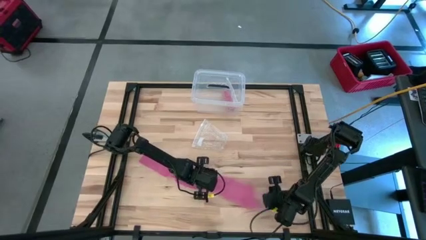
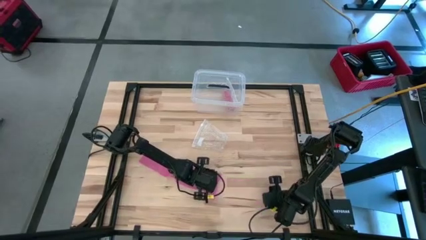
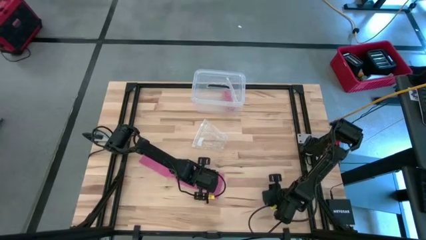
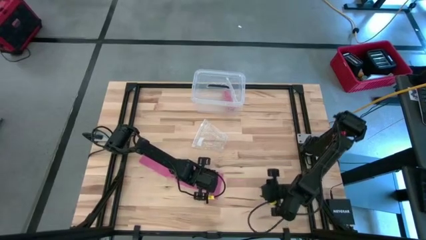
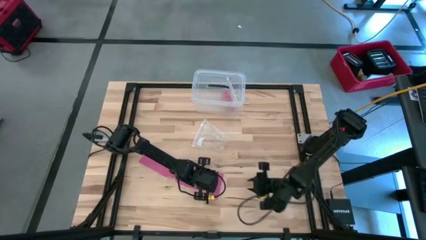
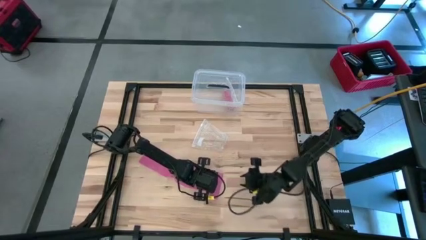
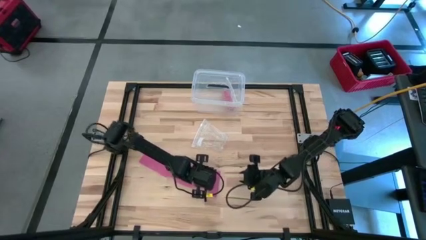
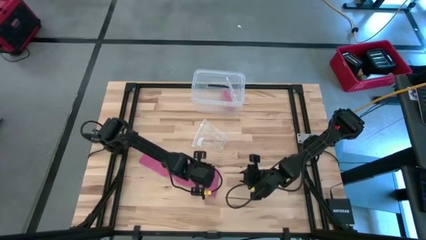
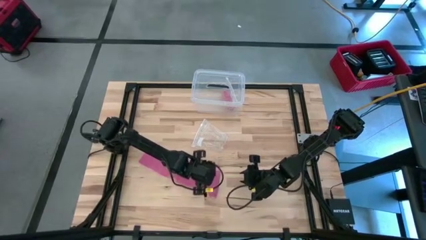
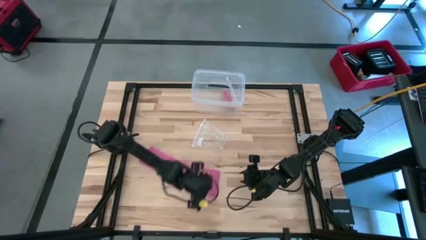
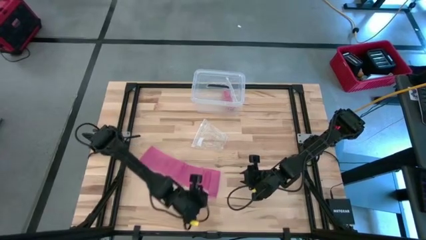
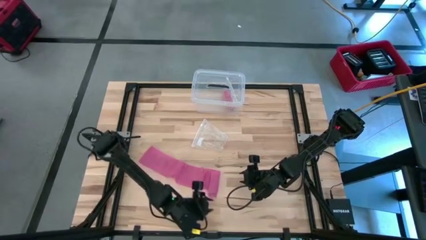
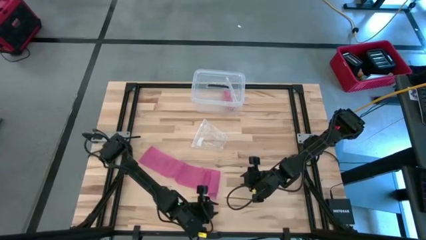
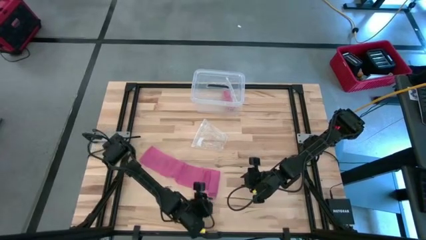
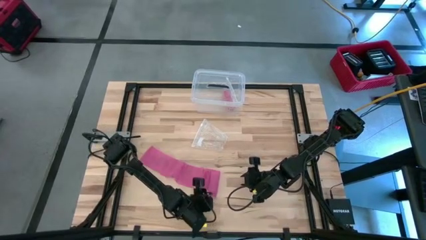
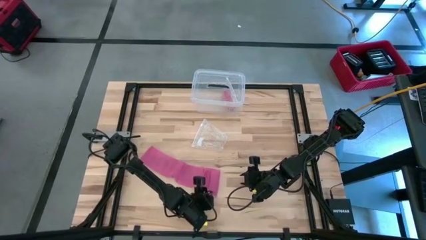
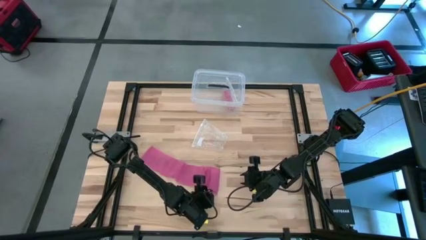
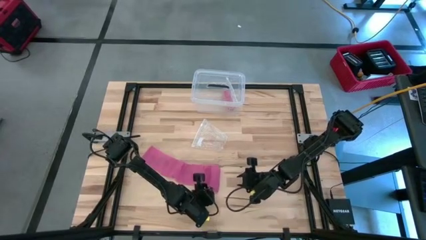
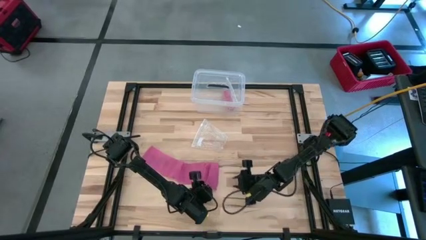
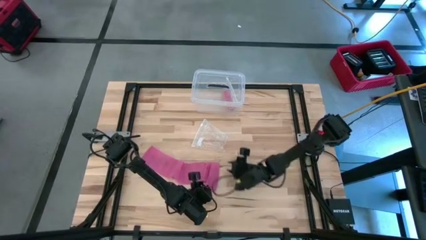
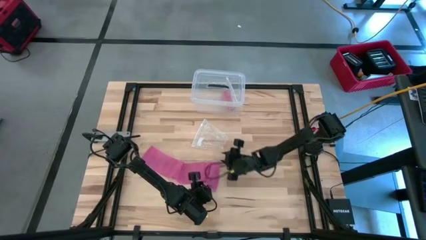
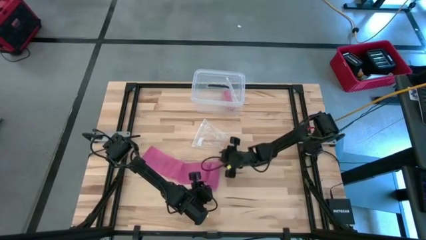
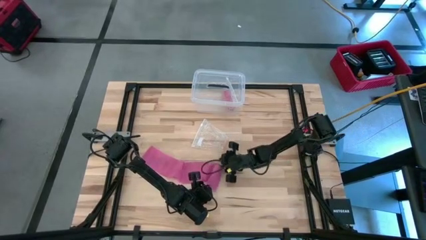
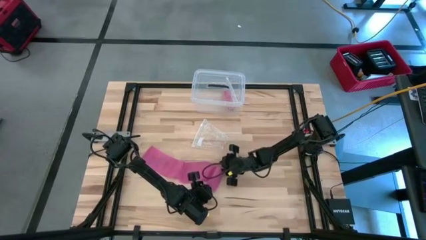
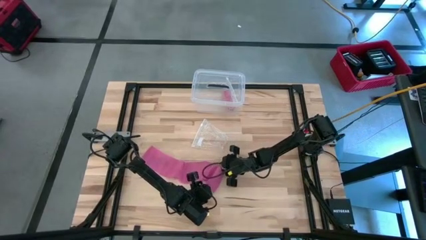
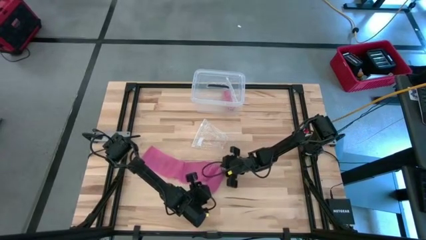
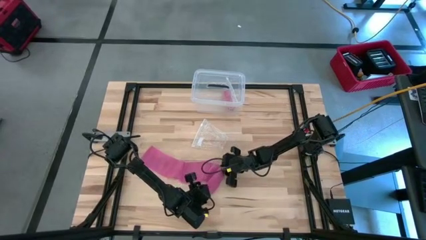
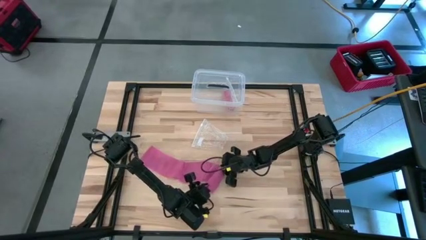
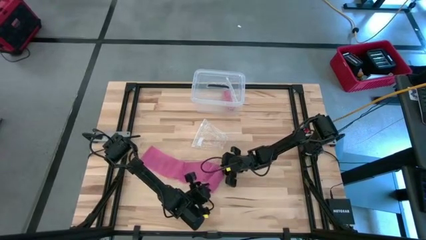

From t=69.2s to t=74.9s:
Task: Roll bandage
Roll the pink bandage

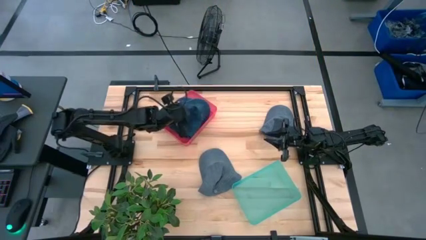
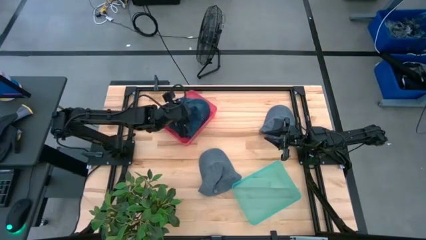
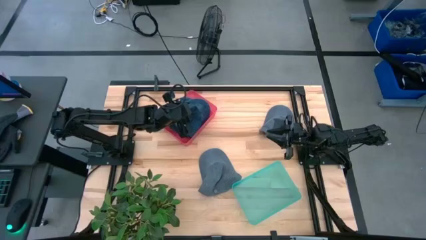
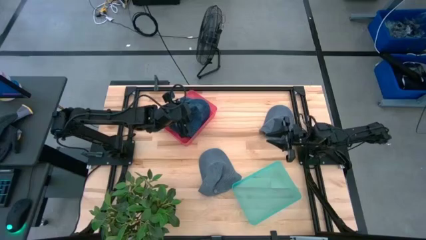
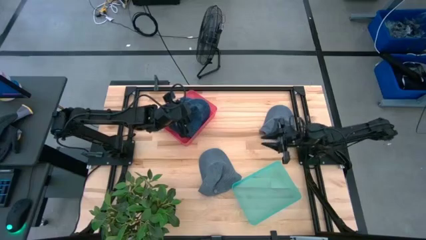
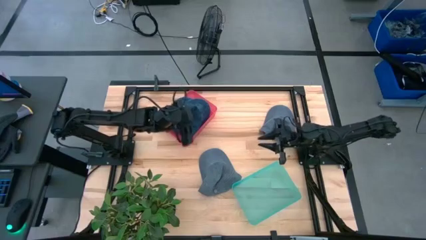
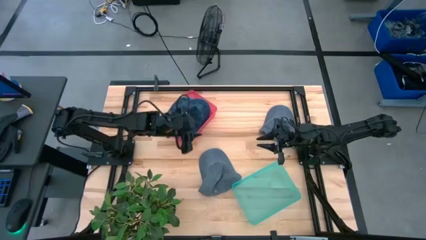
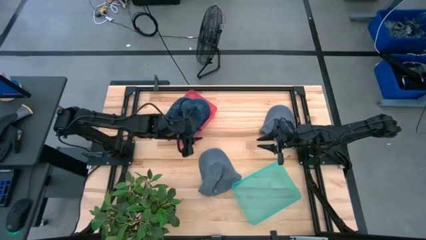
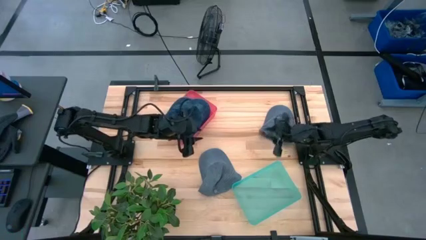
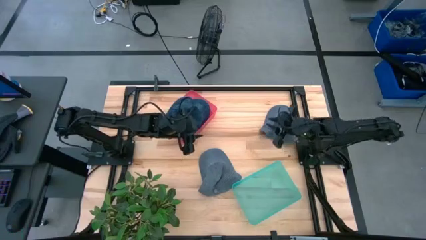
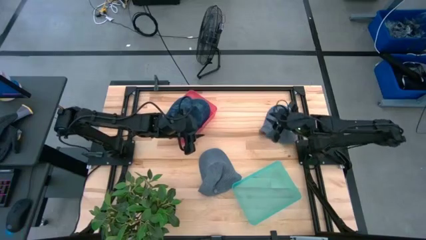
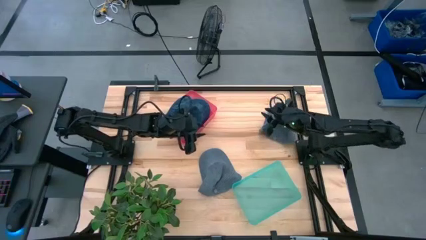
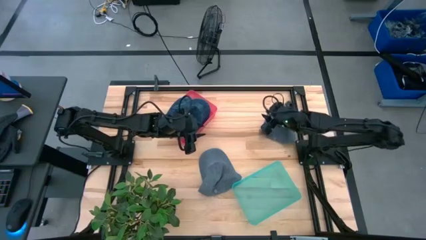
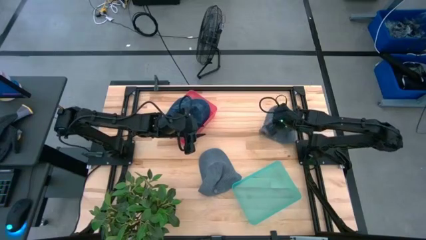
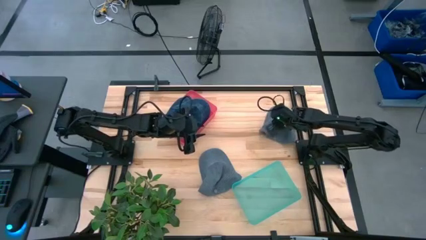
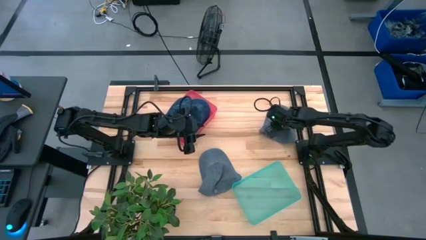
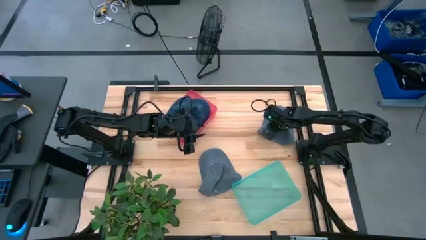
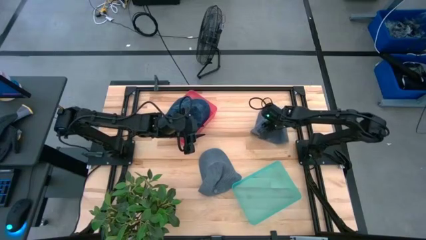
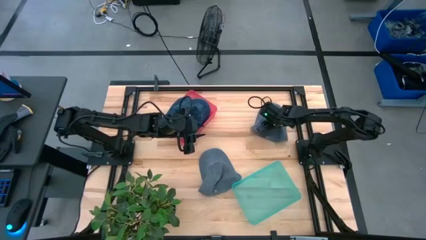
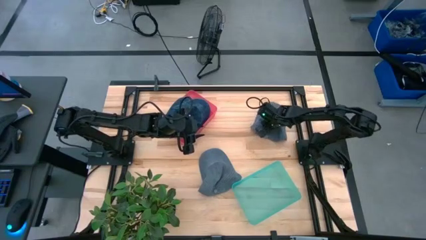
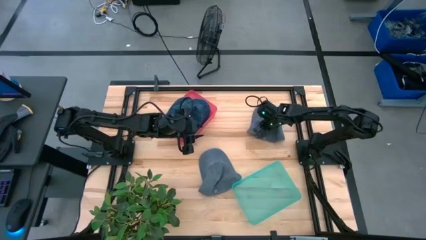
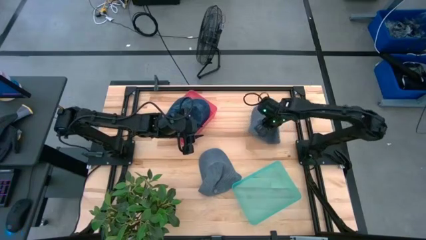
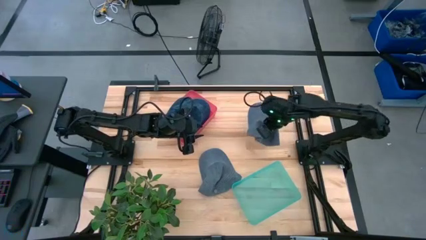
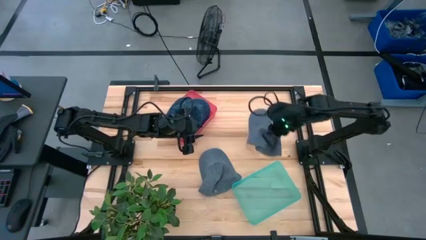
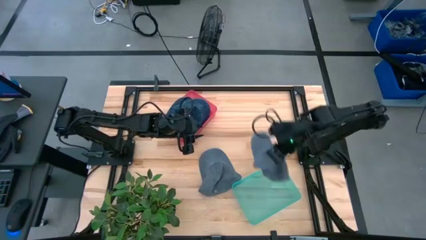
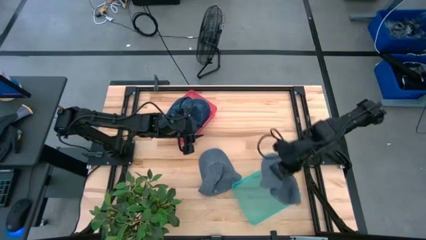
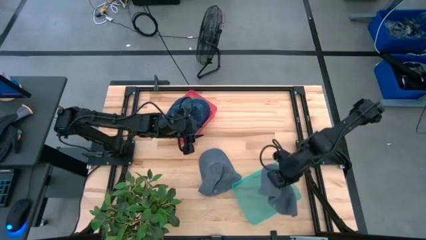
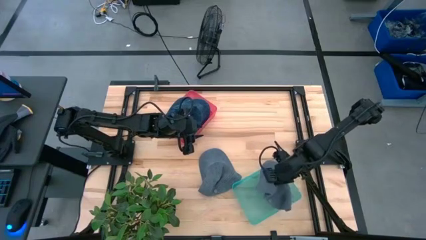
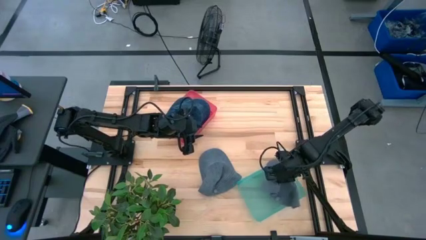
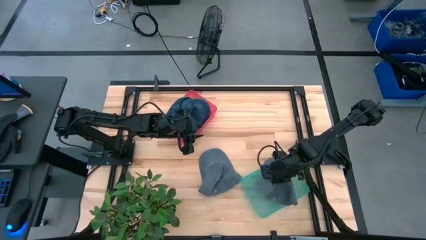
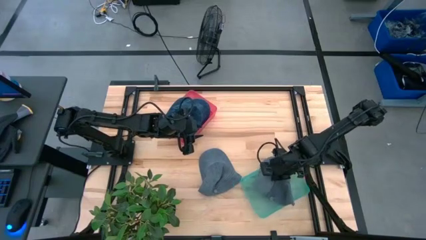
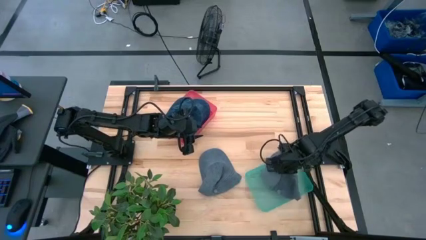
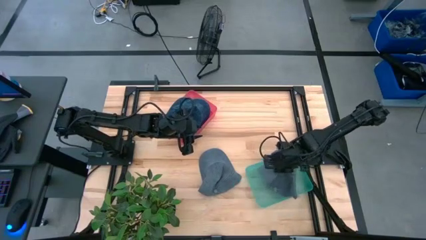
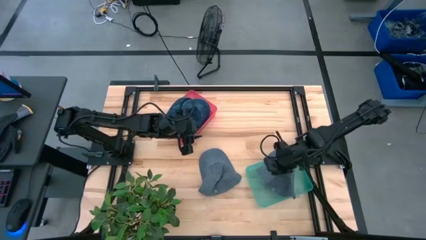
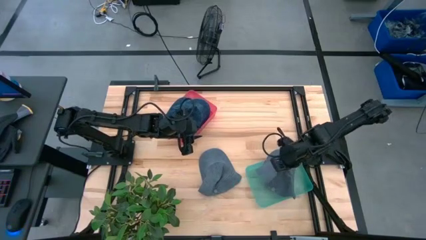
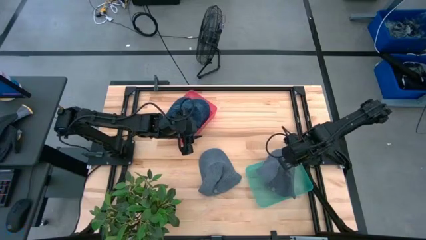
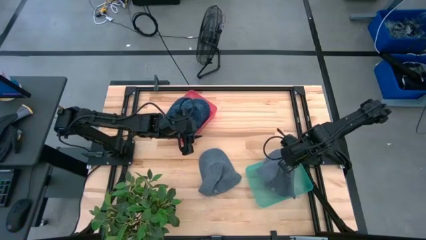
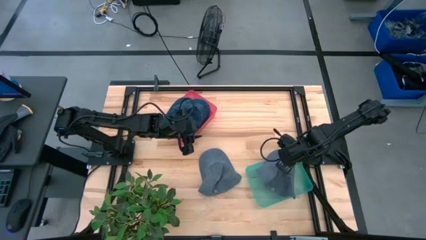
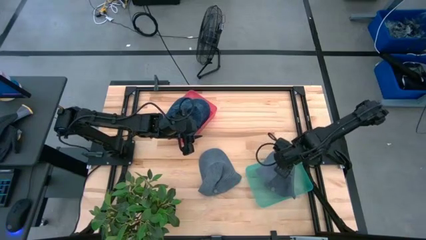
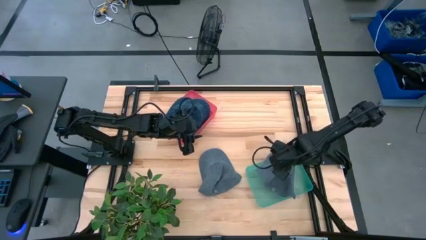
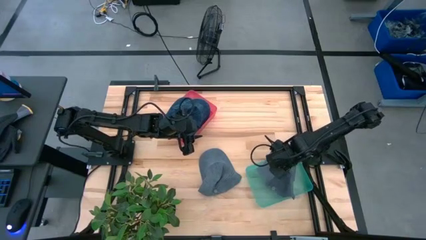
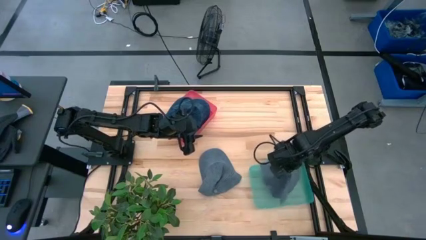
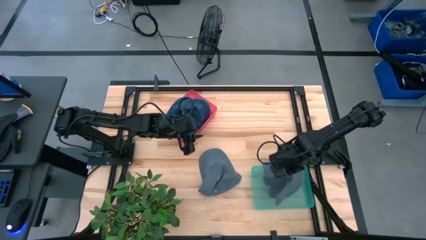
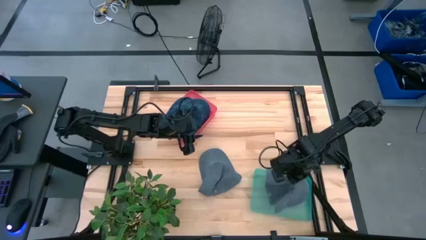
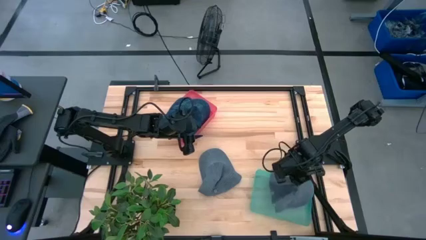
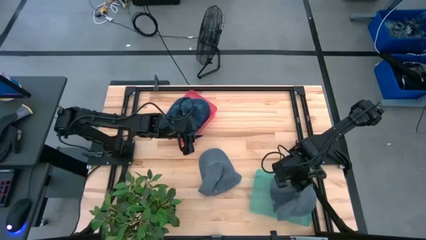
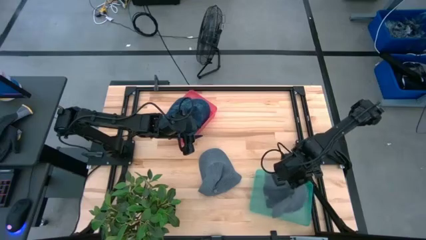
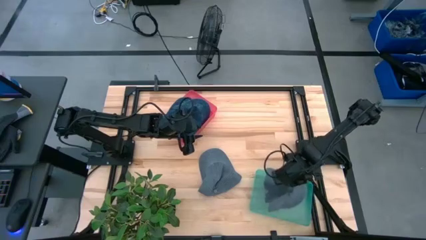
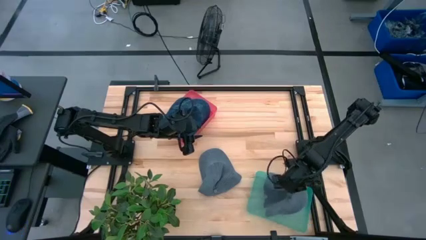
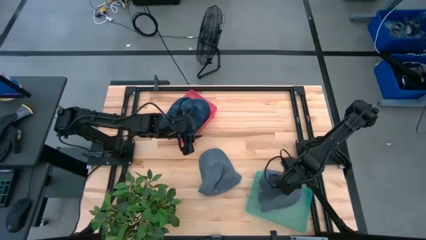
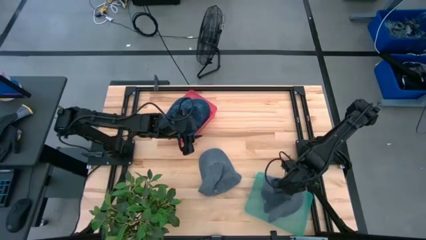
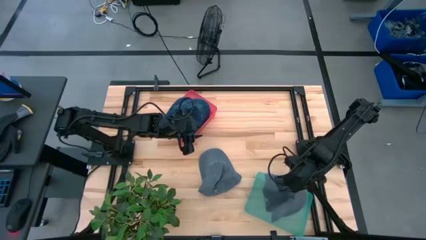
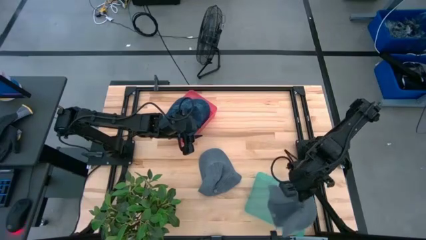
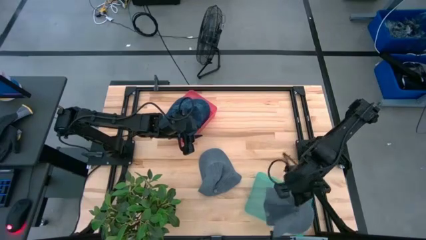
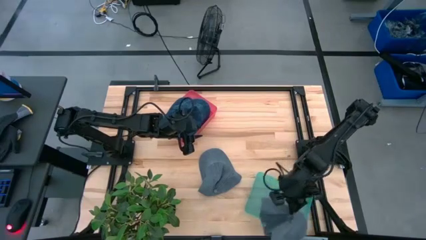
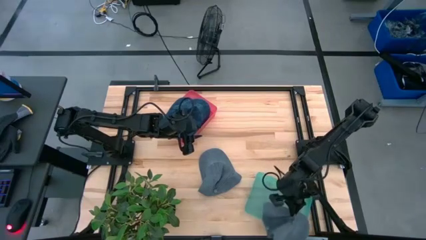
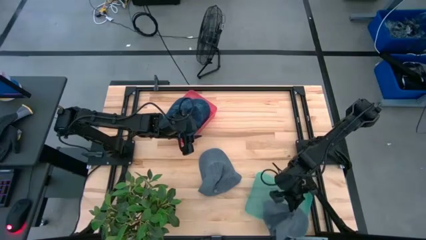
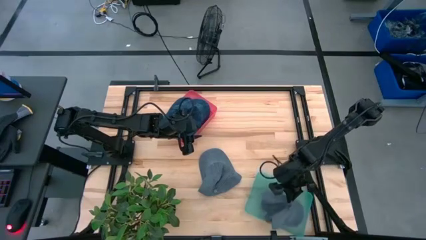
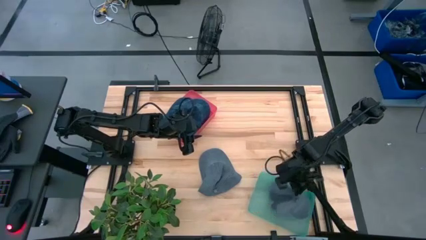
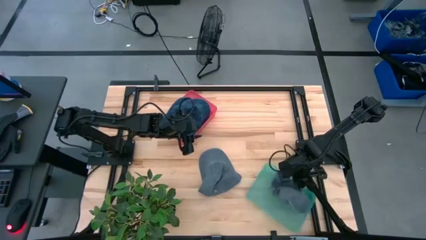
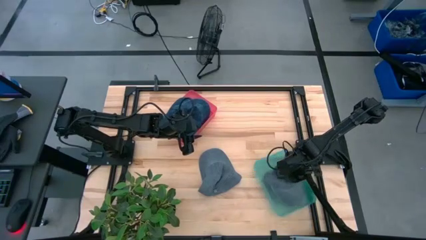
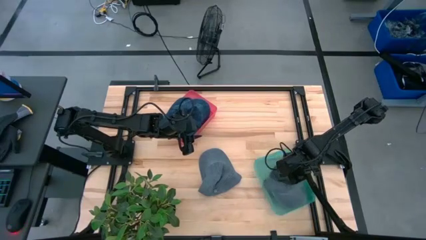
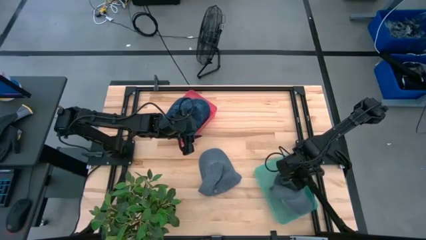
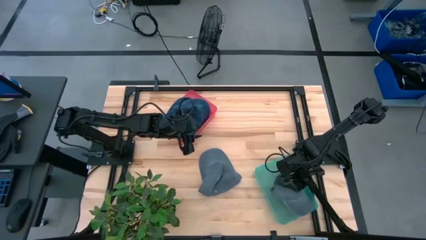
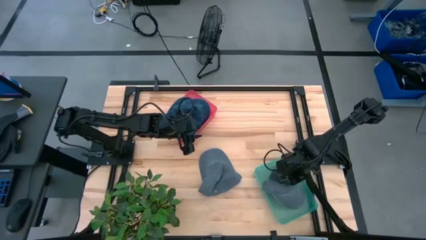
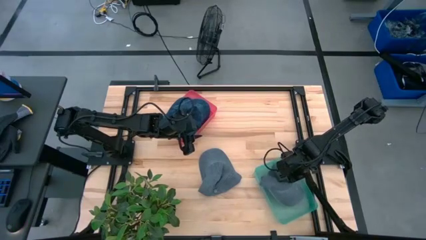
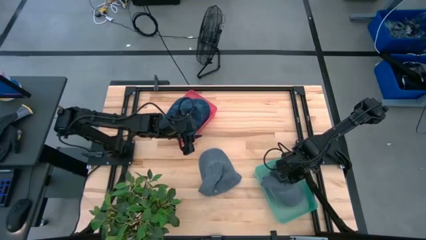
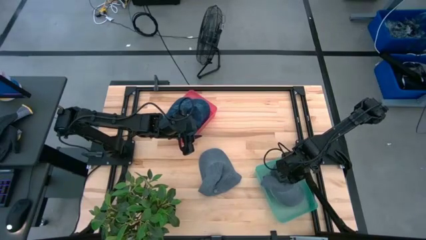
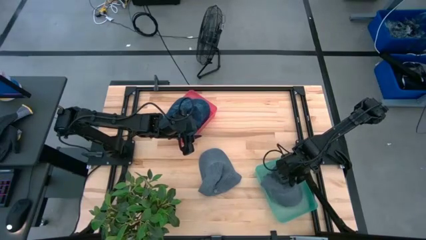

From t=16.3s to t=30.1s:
Task: Pick & Place hat
Put the top gray cap into the green bin
